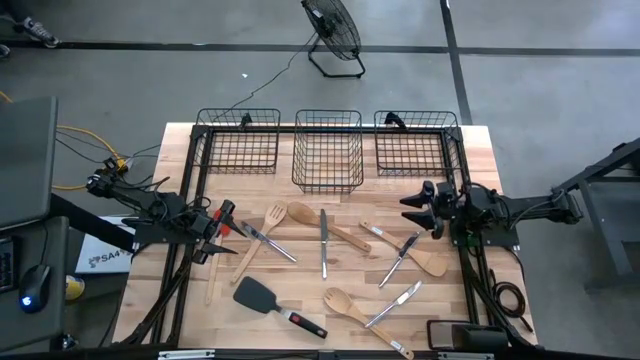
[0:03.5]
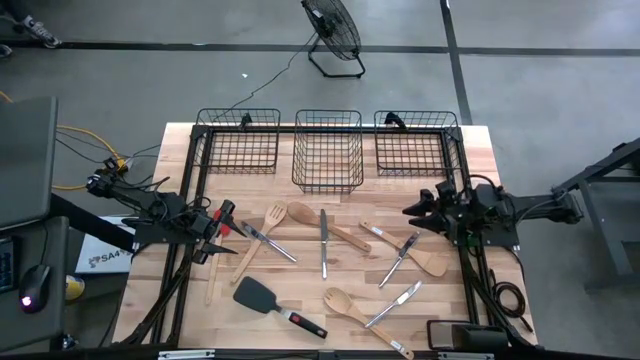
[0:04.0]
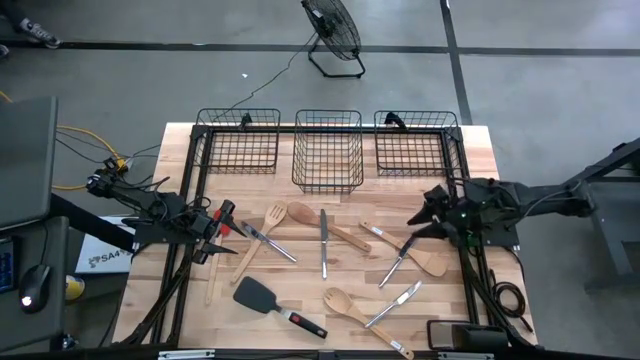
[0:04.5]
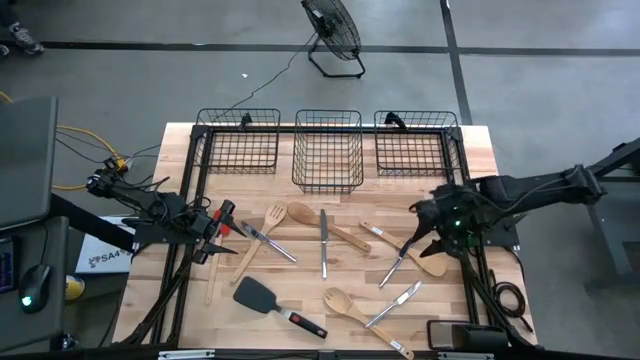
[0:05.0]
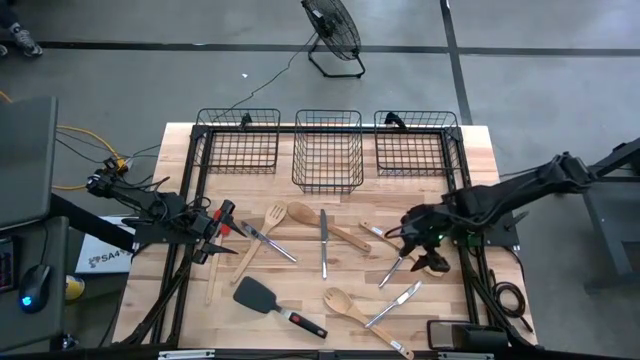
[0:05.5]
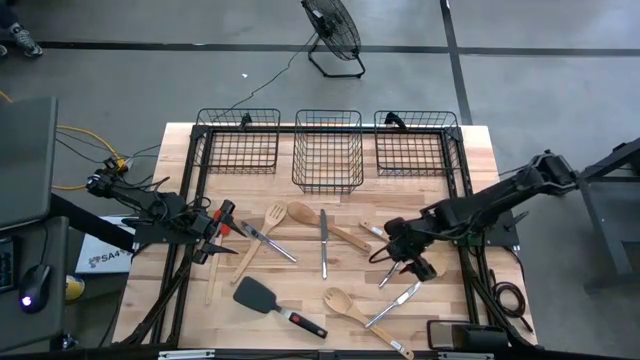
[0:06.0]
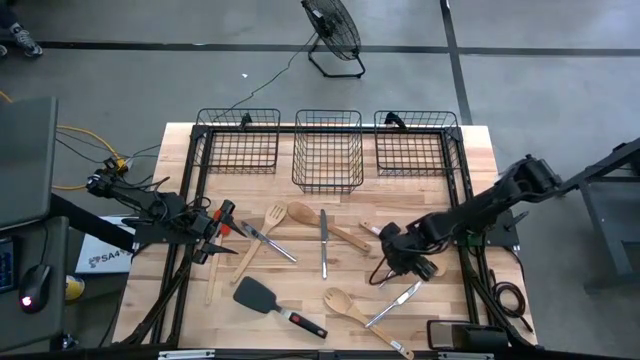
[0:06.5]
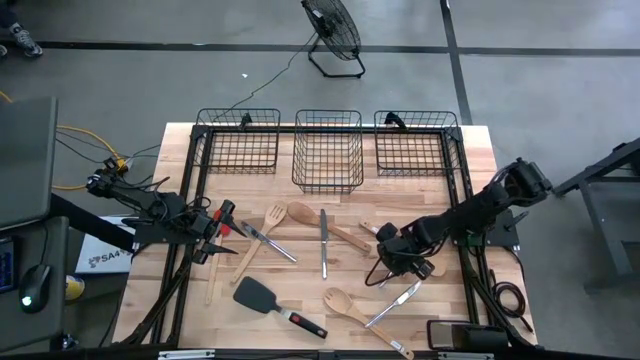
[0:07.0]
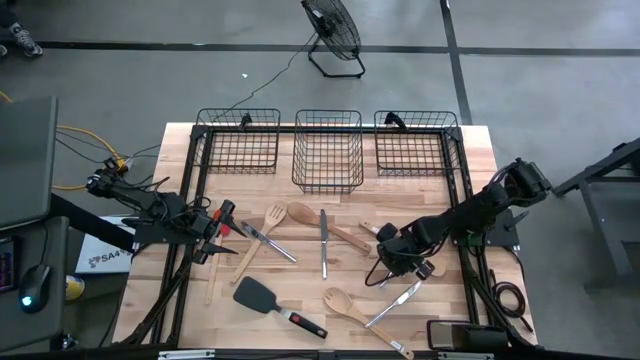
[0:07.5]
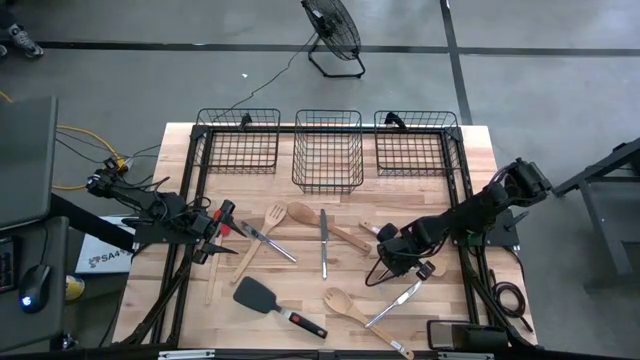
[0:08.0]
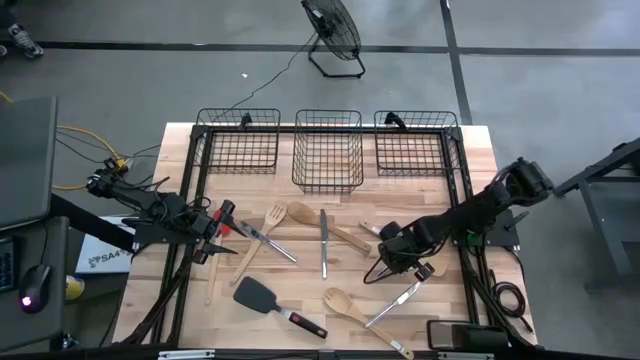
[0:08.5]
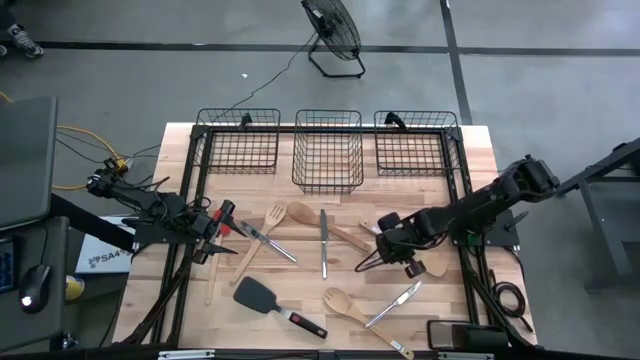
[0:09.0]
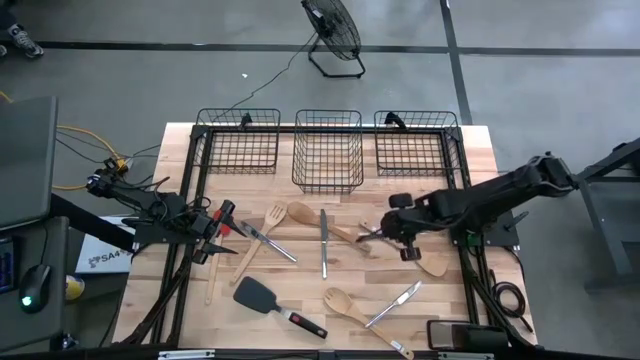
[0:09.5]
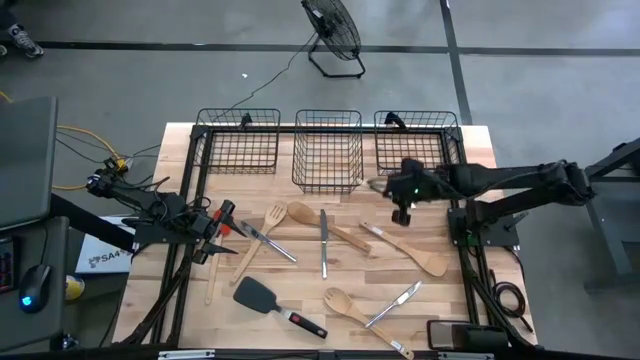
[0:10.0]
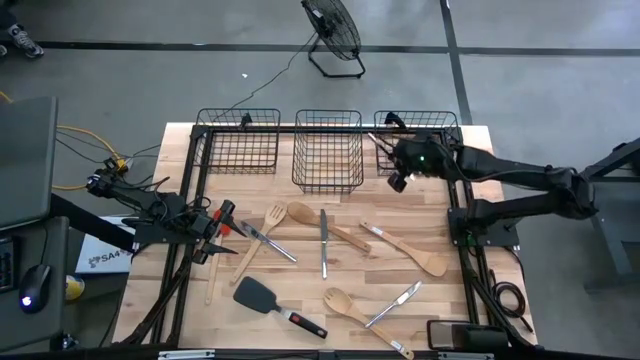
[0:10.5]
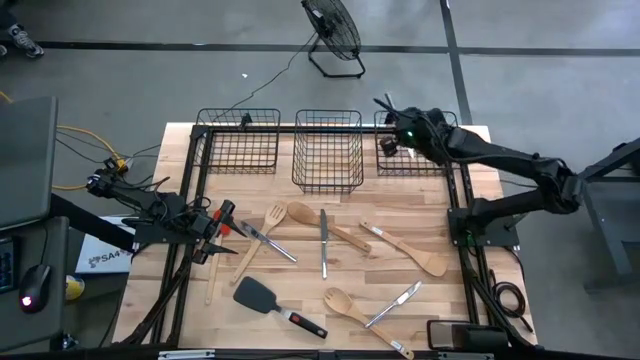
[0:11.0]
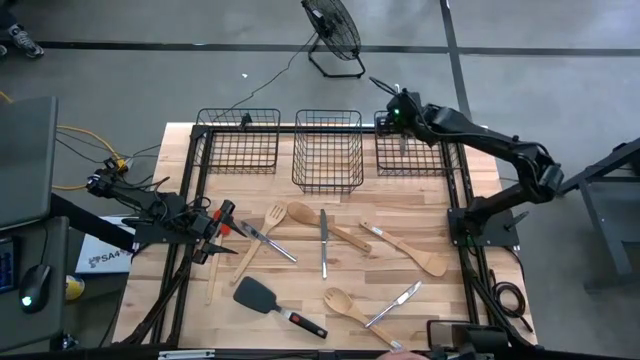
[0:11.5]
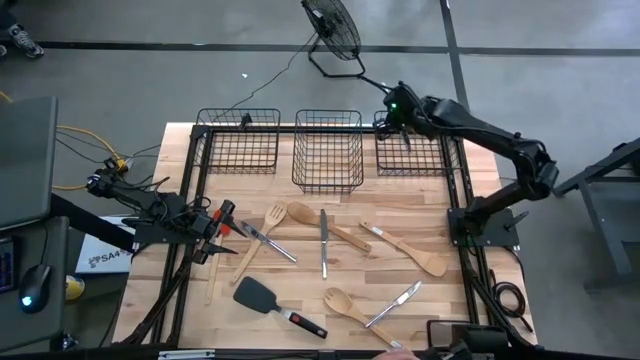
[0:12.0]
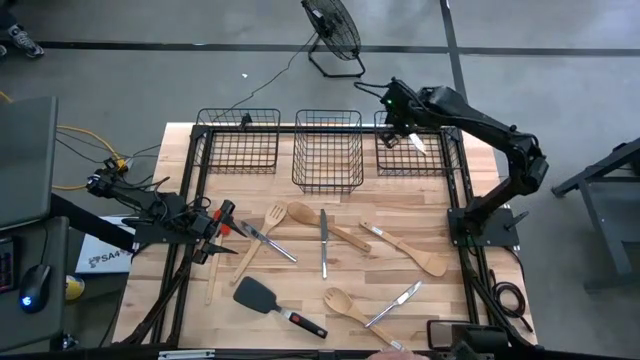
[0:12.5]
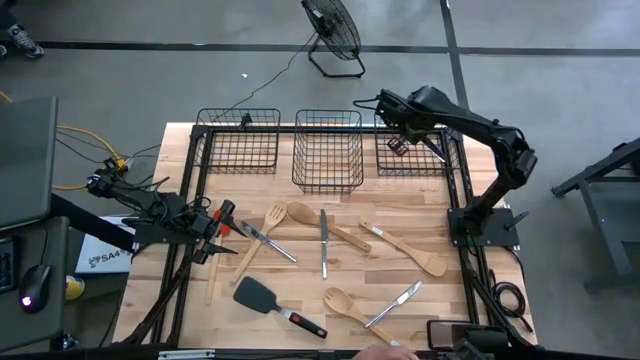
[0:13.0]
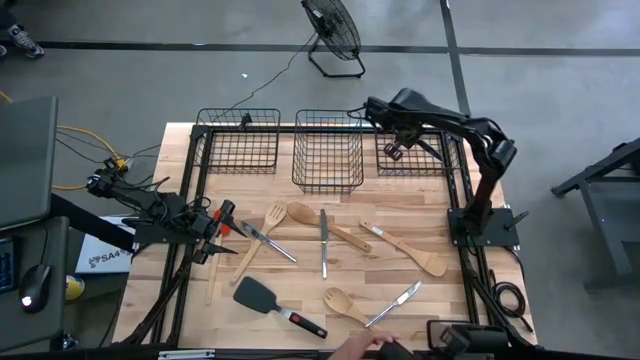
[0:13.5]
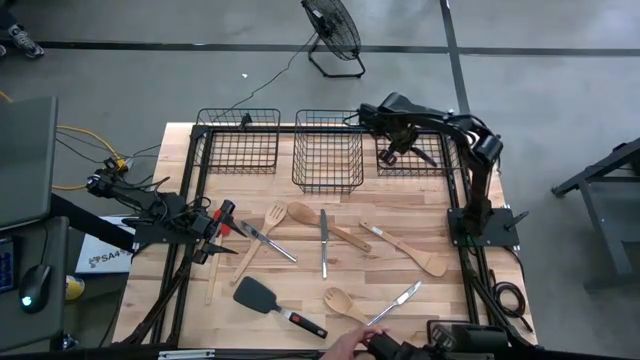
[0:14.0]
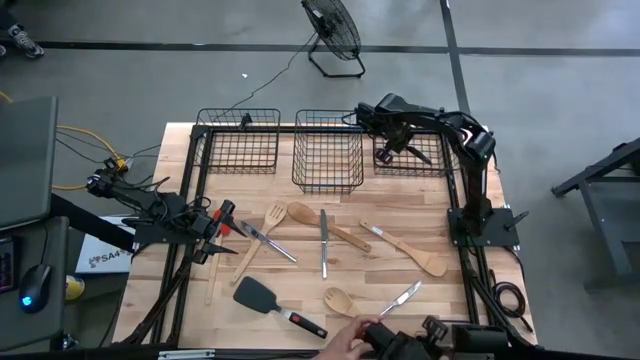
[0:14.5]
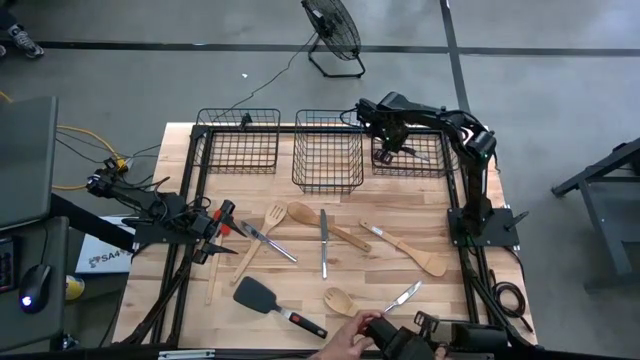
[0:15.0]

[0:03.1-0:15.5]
Task: Pick & Place Kitchen Items
Put the silver table knife into the right wire basket

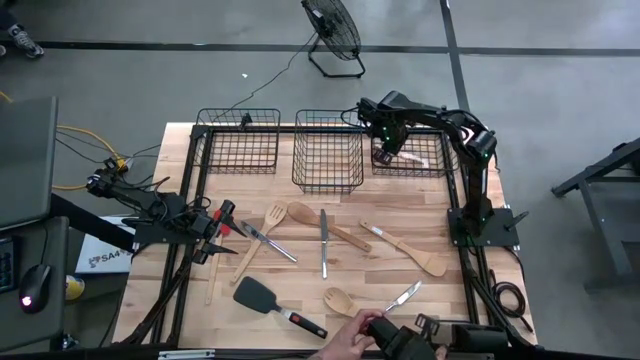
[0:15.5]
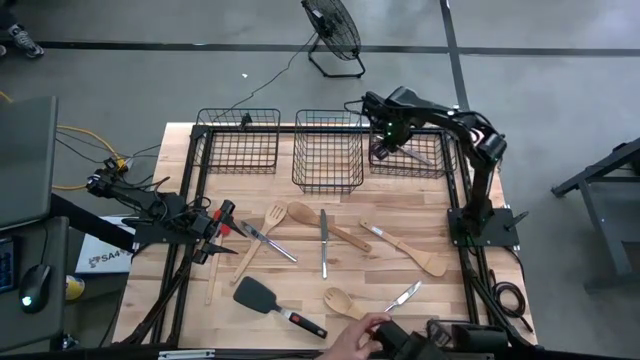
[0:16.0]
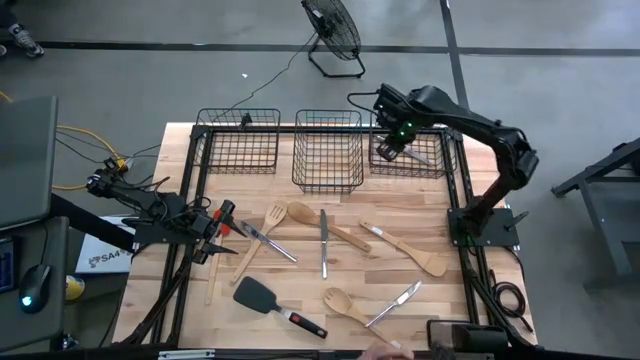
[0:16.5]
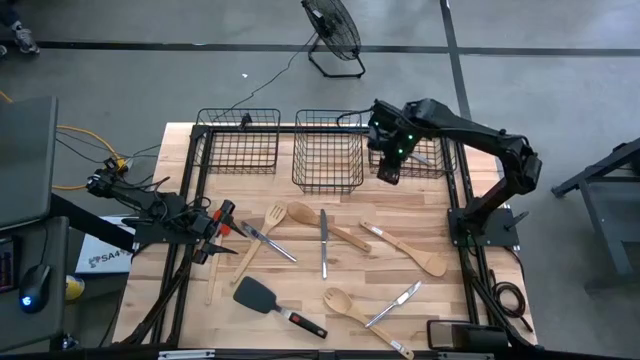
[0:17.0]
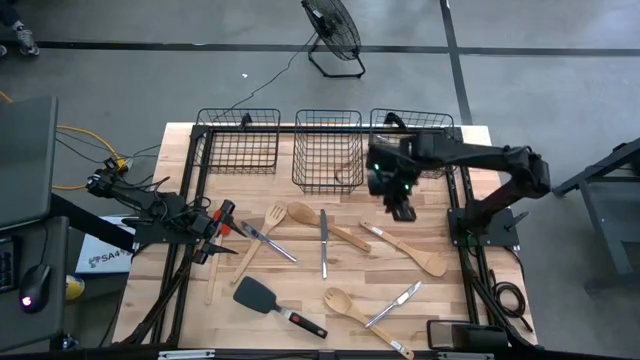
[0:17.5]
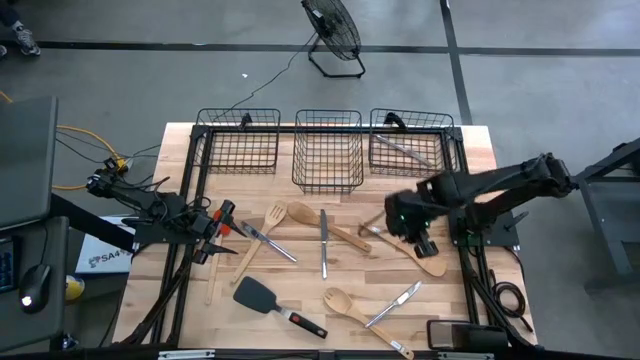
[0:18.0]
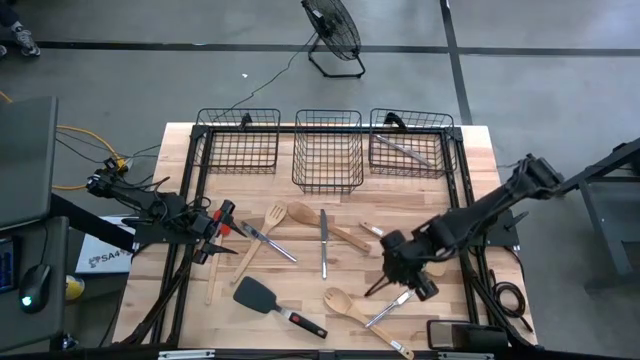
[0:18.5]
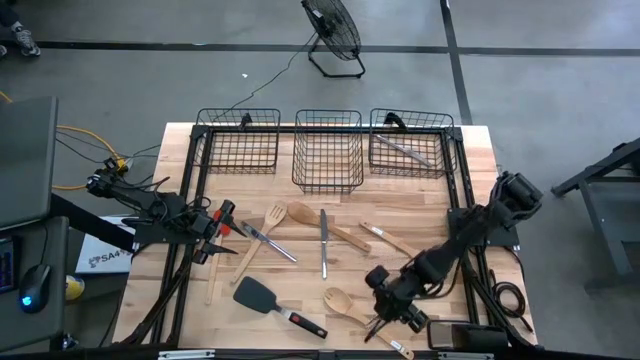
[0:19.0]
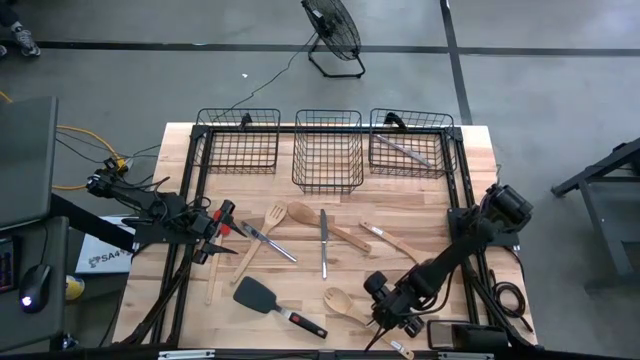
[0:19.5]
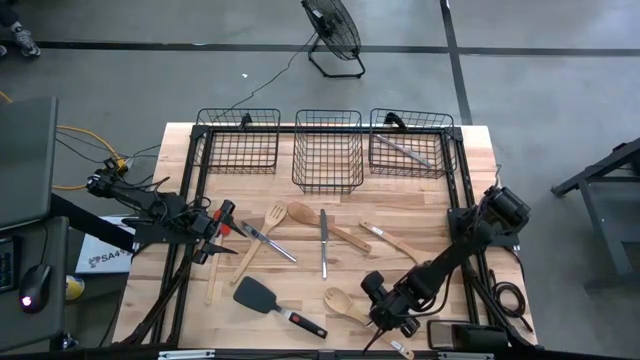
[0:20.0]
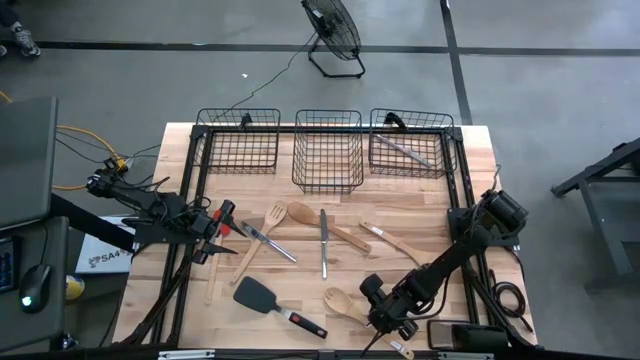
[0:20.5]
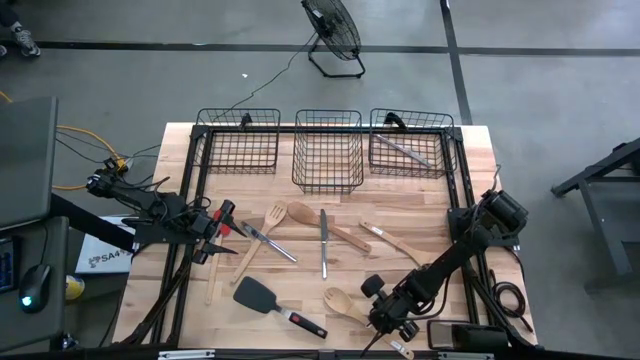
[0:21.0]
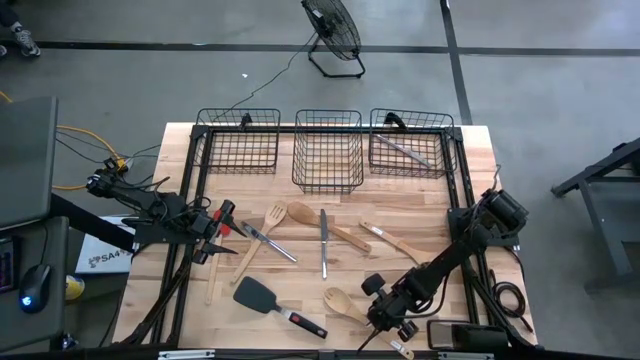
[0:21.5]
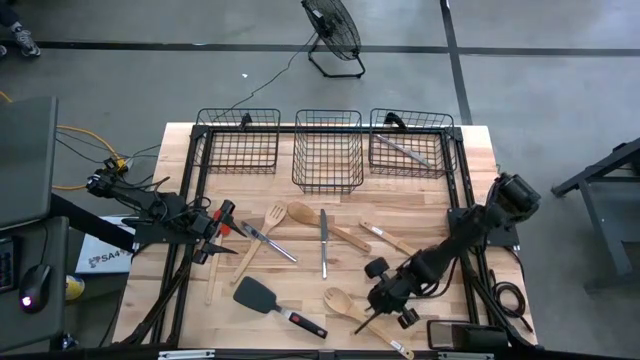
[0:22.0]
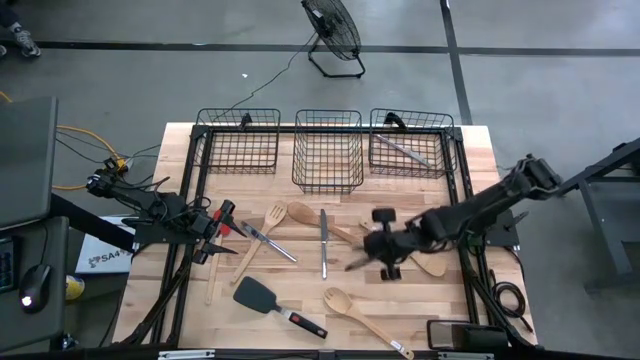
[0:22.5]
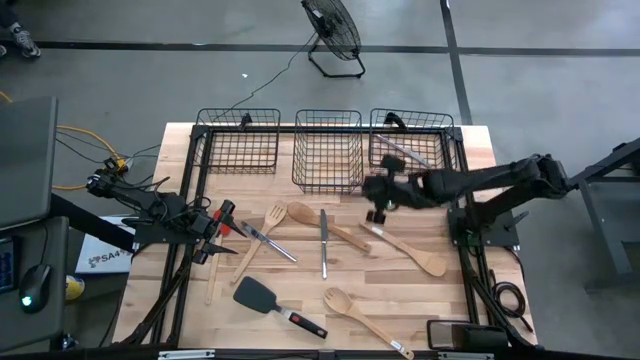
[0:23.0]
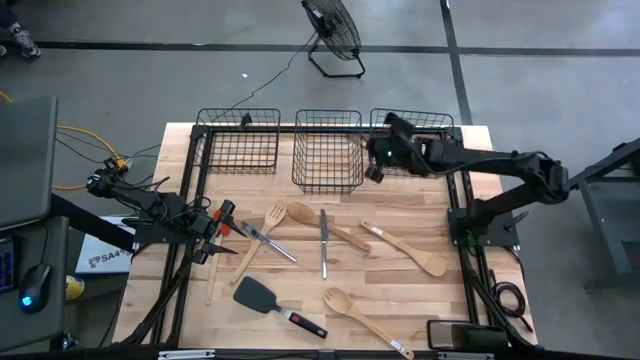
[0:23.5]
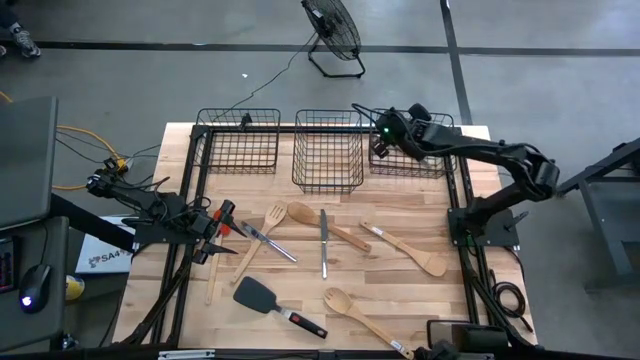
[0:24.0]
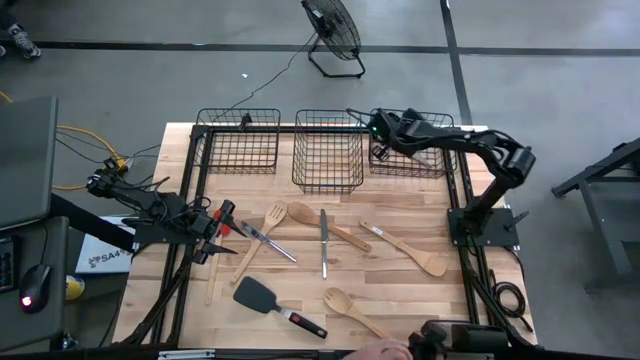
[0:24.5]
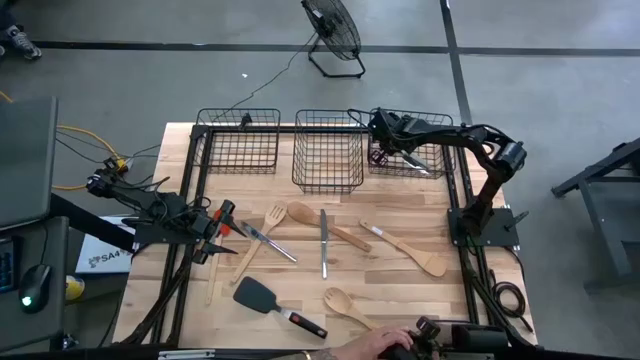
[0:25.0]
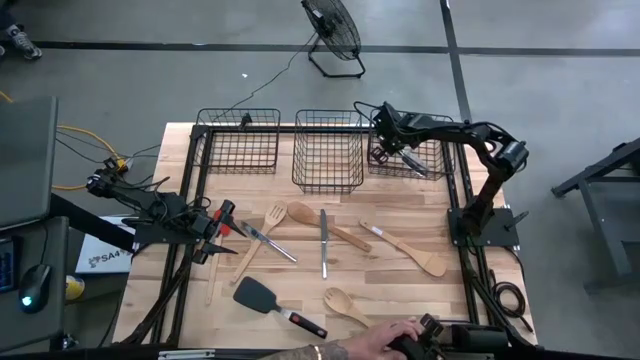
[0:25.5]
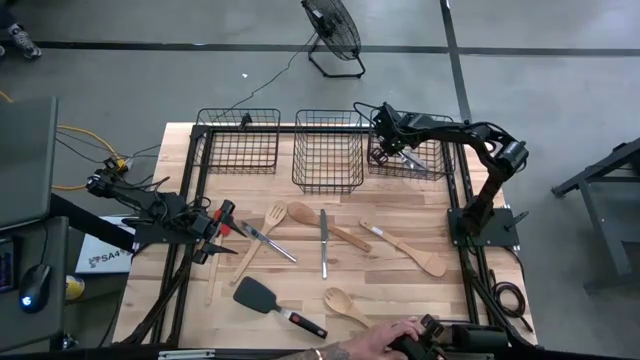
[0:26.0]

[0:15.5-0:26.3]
Put the silver table knife into the right wire basket
